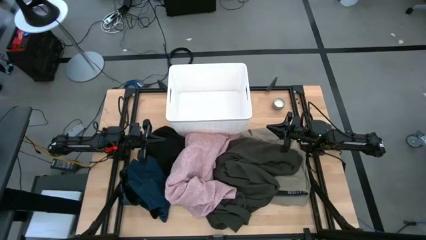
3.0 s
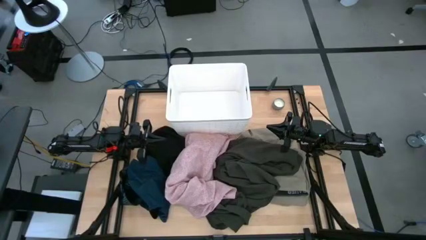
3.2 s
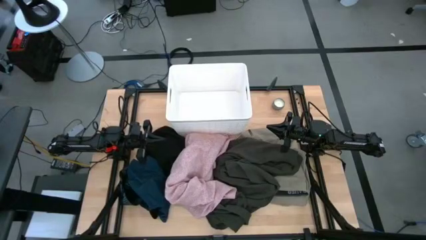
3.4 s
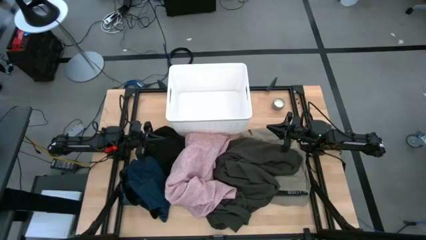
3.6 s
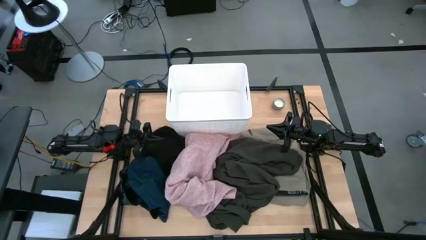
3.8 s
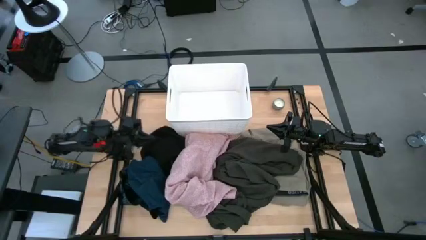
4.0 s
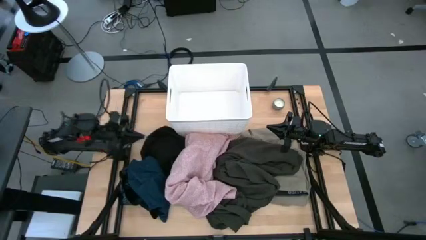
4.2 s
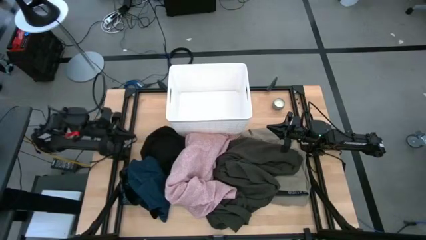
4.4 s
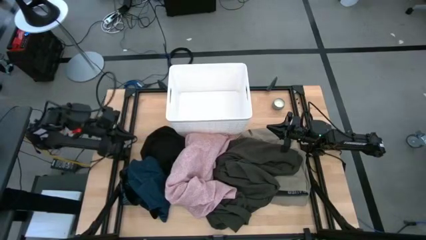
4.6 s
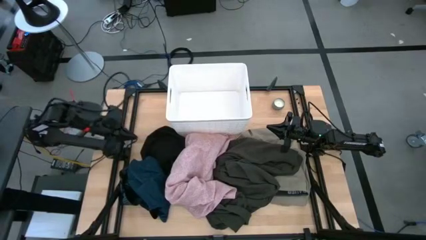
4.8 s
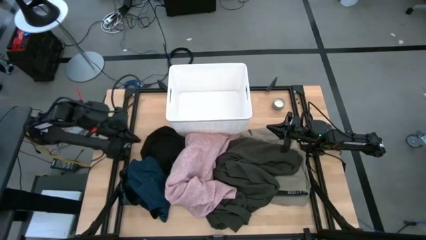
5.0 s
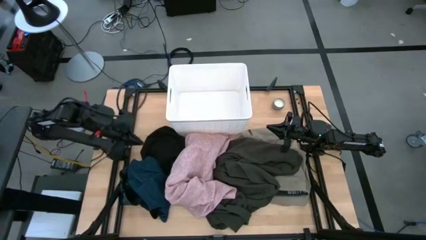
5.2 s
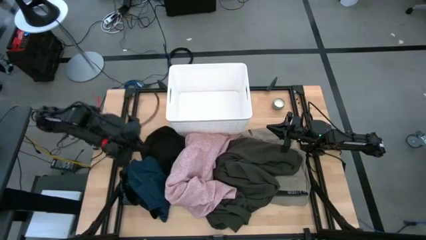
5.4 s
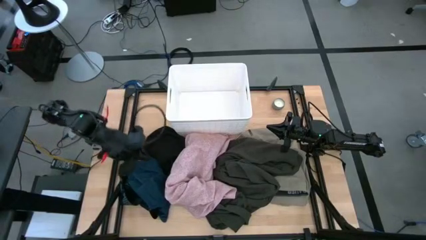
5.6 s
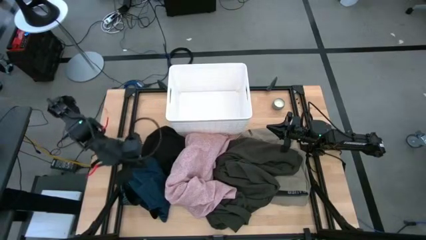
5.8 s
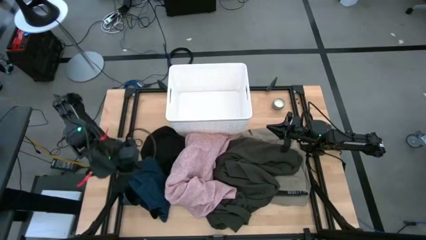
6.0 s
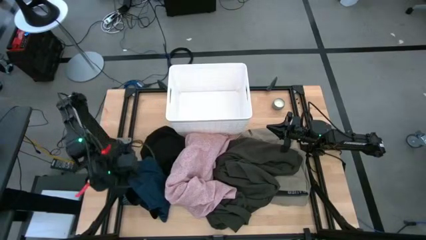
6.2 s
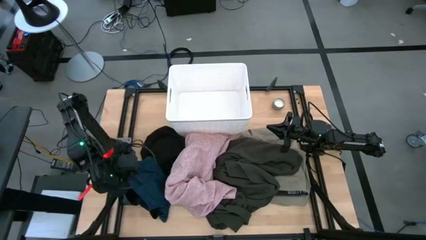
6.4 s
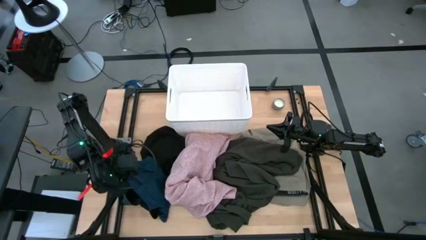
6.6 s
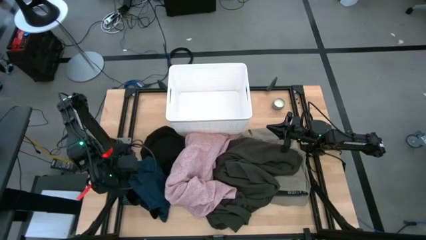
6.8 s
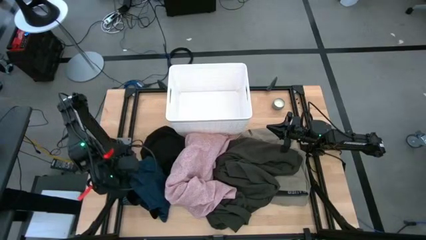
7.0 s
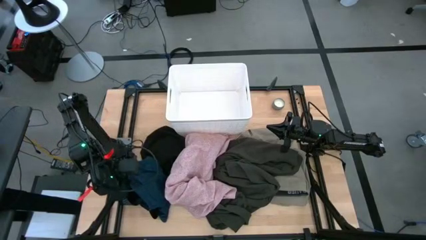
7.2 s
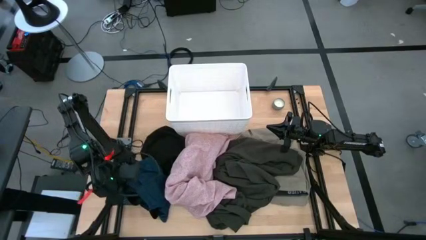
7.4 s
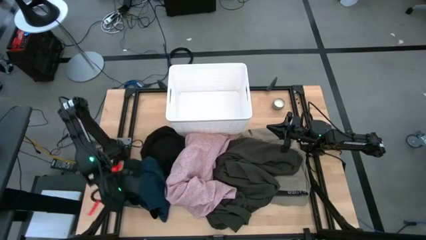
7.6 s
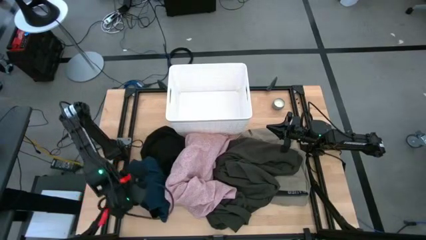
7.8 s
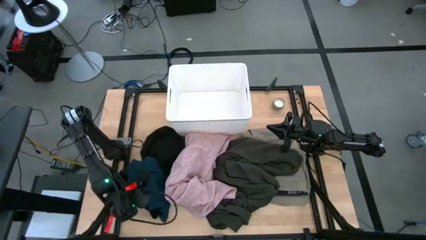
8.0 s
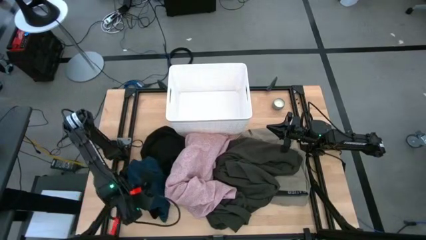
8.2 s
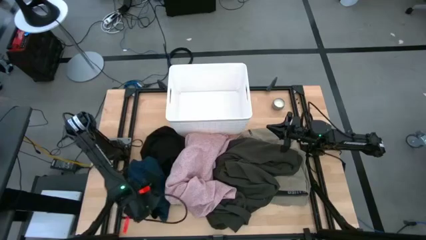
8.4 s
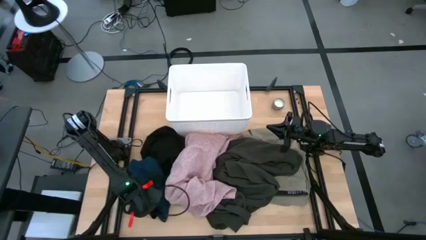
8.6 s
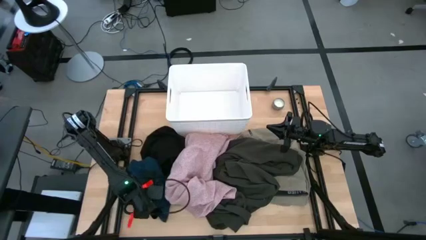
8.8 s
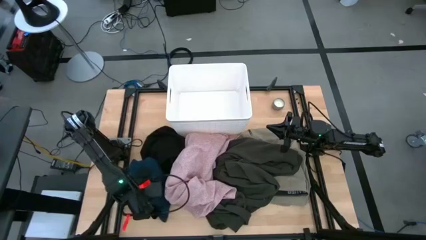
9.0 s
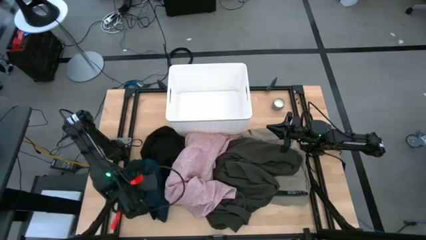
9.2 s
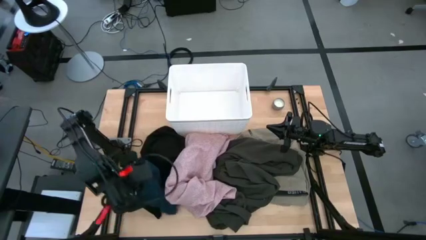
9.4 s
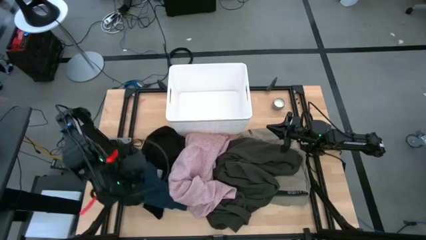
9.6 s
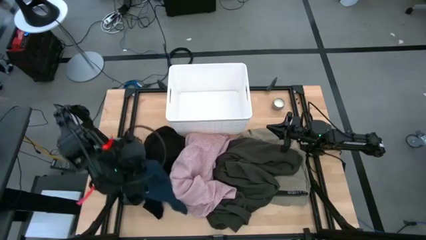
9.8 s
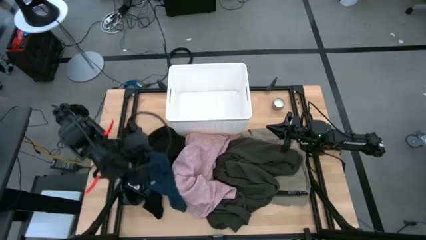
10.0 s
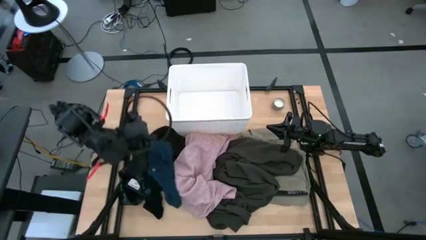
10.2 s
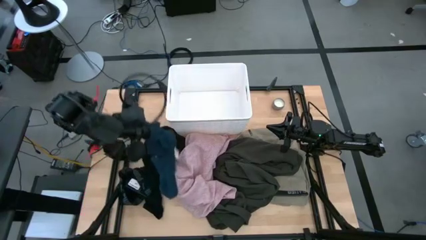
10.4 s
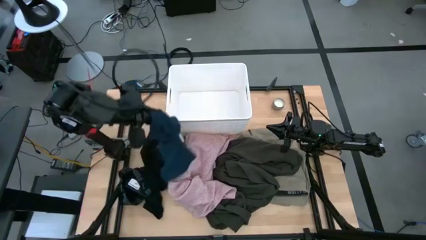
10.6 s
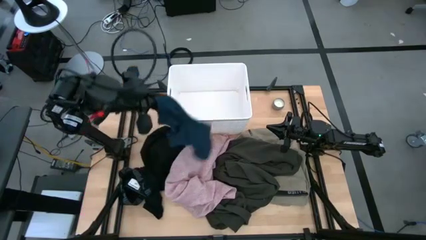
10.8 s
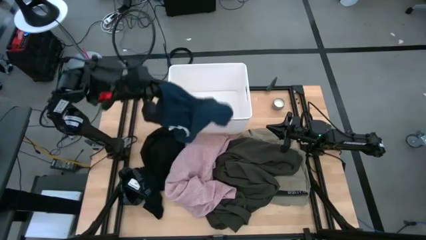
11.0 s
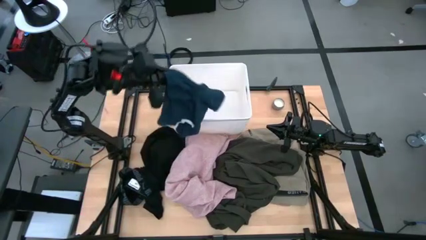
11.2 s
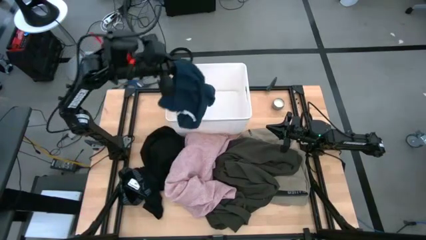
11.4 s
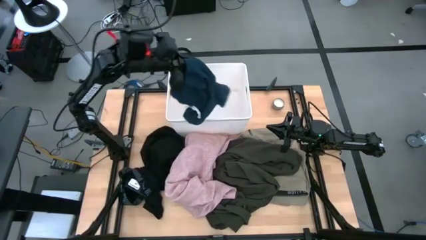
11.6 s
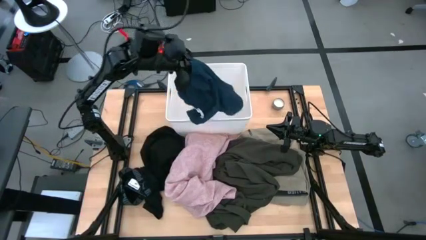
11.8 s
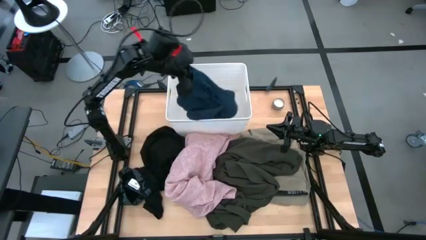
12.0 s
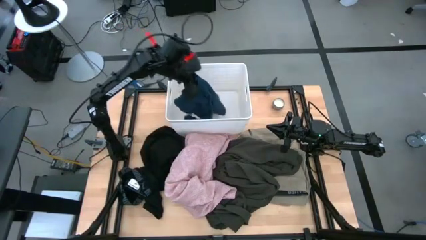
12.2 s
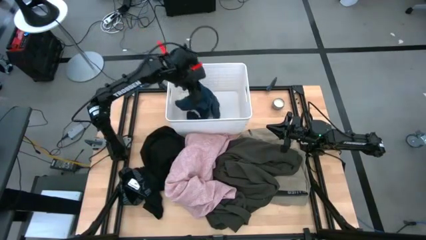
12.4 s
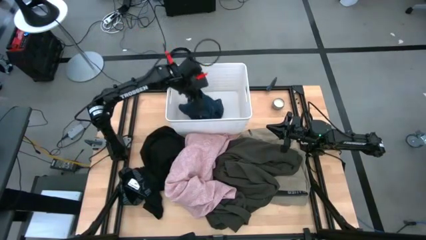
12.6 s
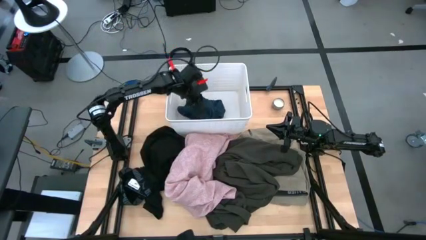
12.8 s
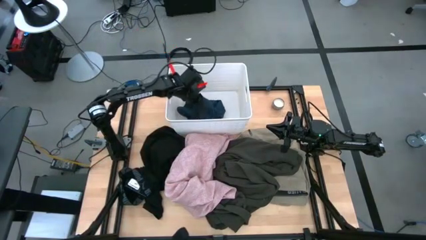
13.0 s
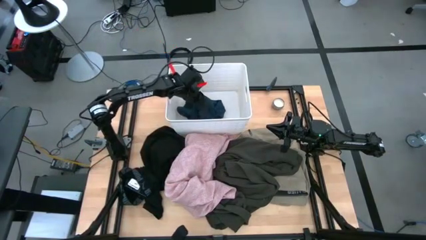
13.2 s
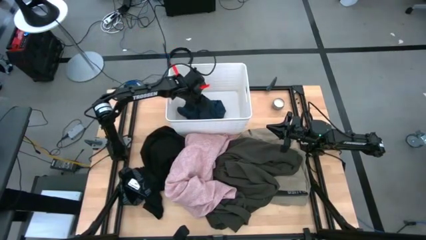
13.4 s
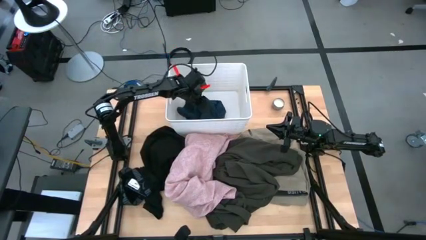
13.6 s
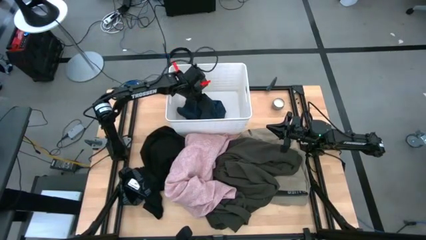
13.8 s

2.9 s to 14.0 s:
Task: Sort clothes
Put the blue shorts into the white laundry organizer
